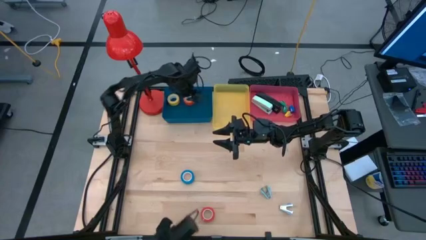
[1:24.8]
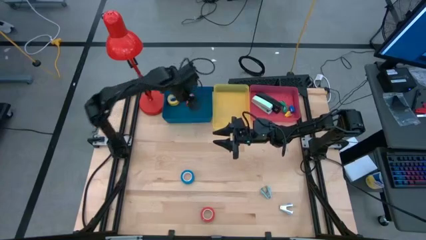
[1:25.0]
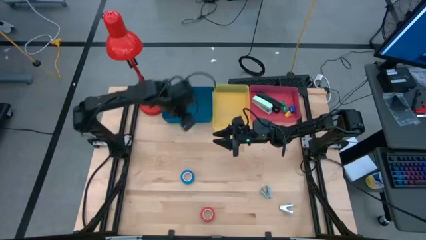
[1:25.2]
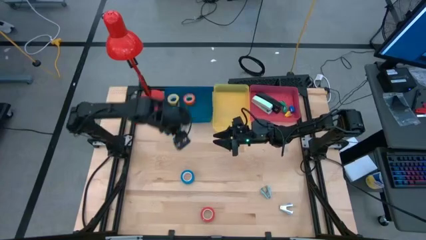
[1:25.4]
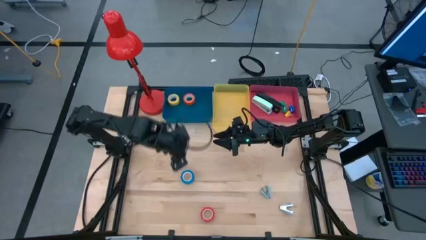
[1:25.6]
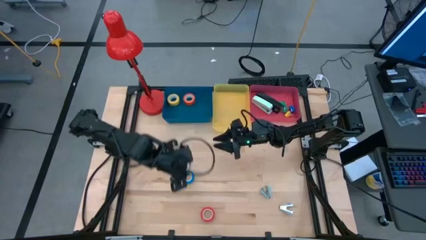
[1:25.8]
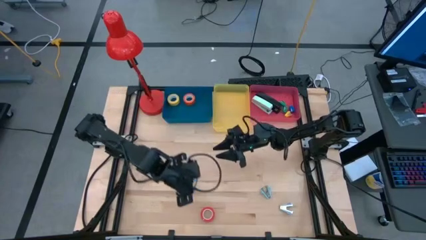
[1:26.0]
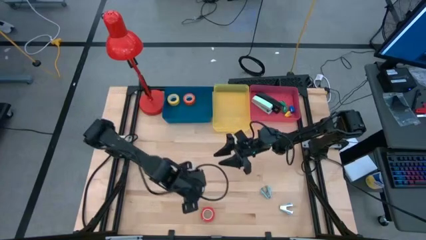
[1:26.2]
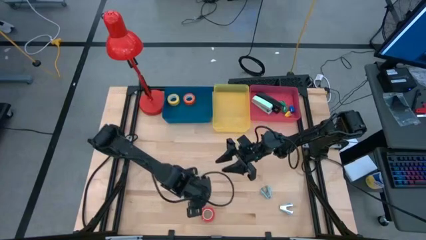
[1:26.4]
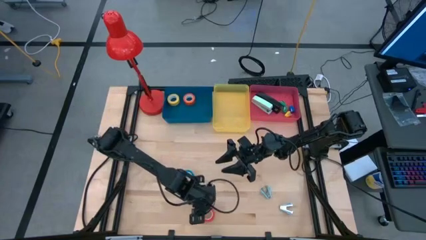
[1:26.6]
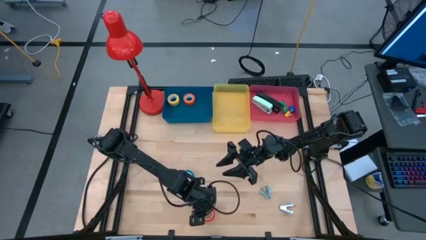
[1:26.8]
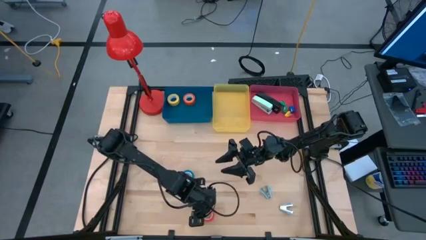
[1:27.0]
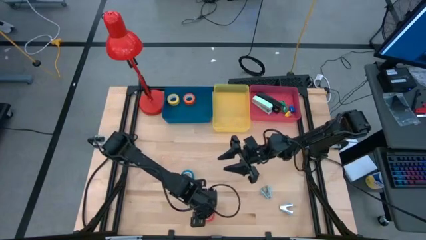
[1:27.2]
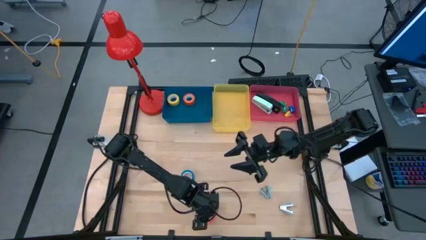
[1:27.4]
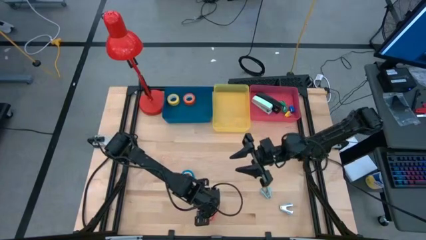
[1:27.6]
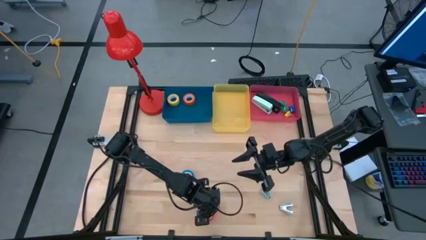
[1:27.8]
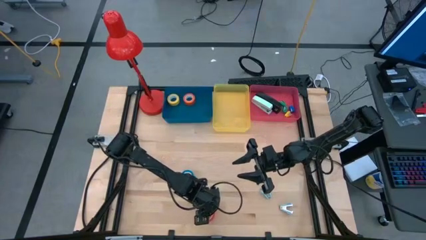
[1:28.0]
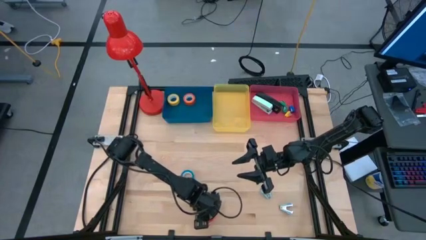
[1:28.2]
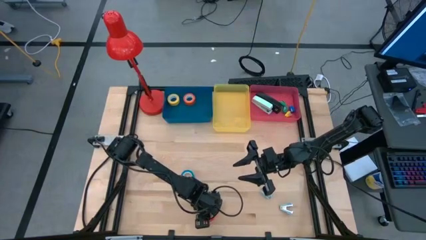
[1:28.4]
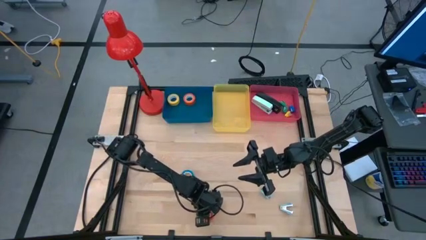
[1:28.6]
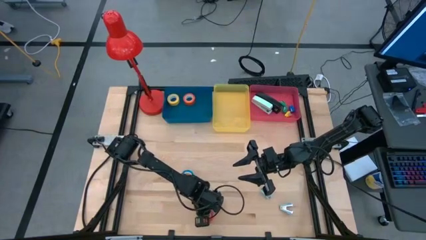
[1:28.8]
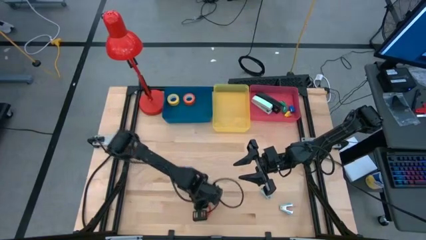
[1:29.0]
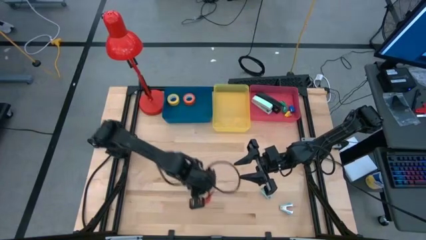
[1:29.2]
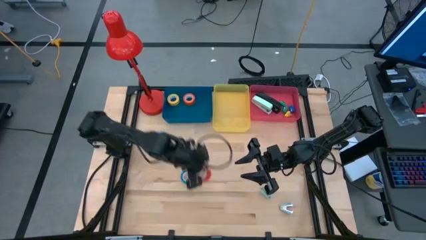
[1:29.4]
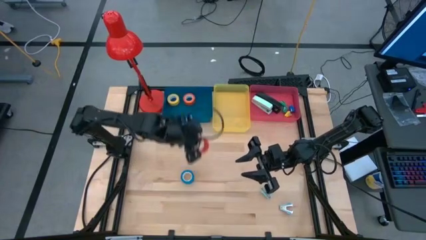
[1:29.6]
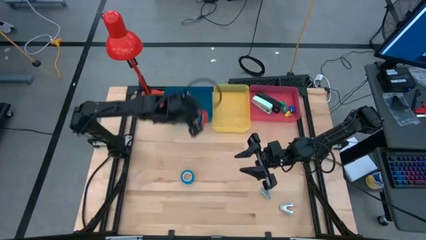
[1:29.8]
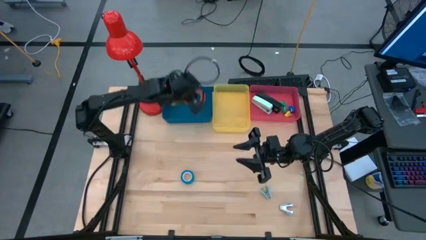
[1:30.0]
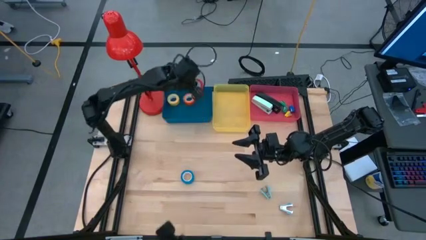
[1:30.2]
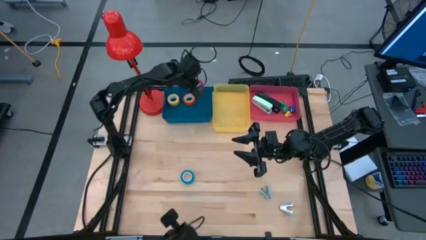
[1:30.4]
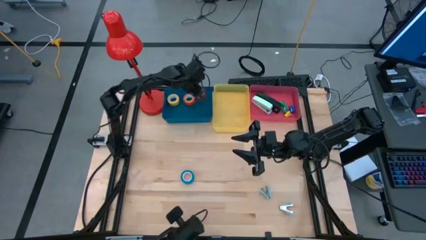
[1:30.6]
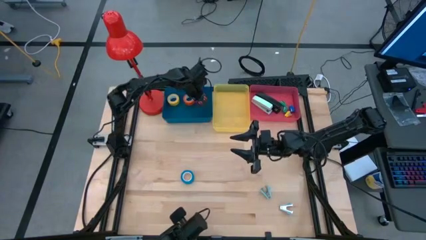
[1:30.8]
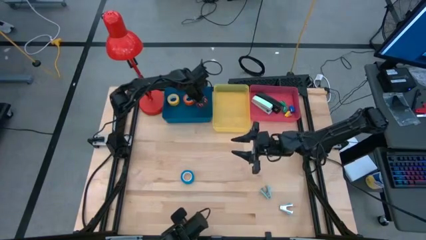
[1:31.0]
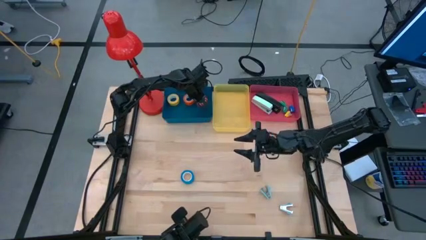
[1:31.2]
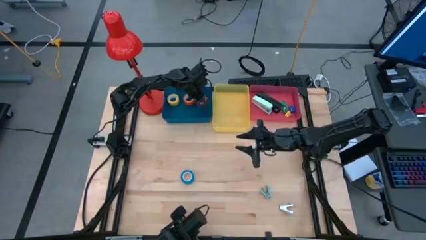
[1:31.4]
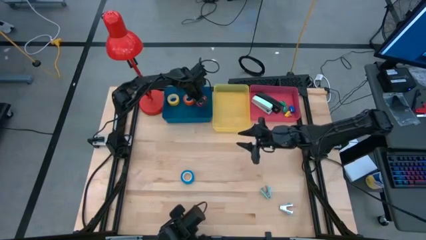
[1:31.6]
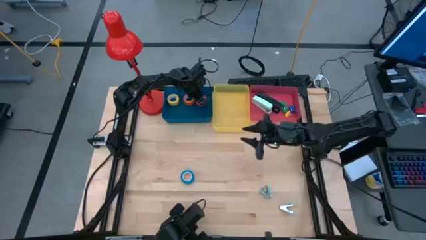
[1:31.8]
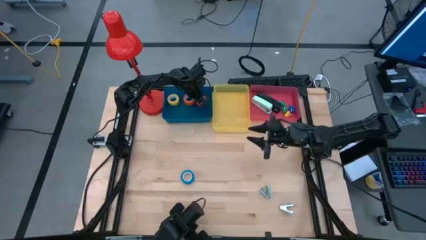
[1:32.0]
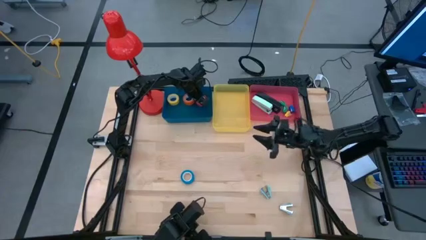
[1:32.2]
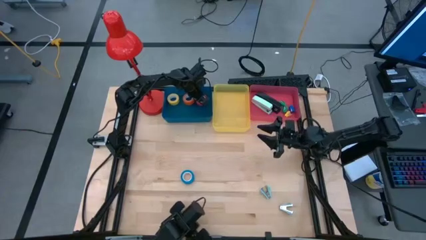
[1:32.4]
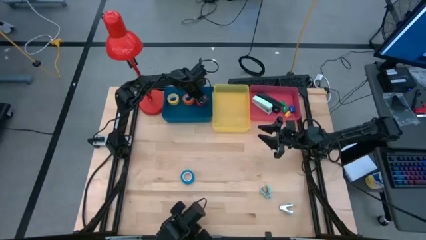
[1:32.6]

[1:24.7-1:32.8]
Task: Pick and place Stapler, Stapler remover, tape
Put the red tape into the blue bin

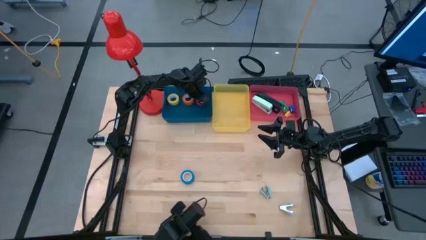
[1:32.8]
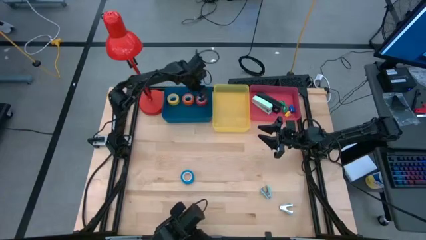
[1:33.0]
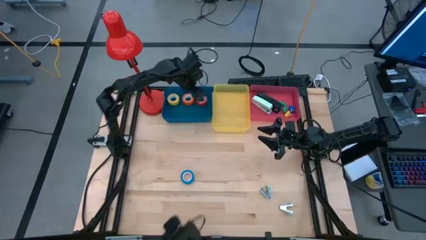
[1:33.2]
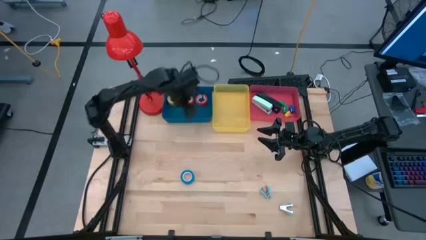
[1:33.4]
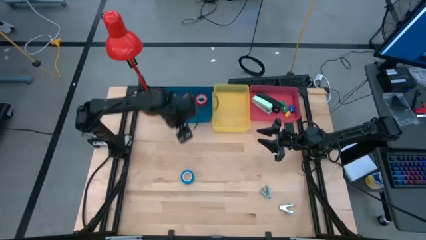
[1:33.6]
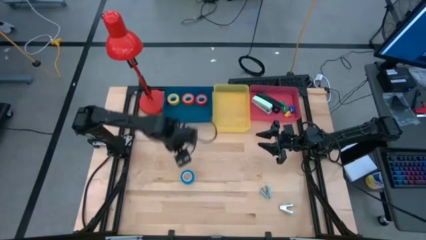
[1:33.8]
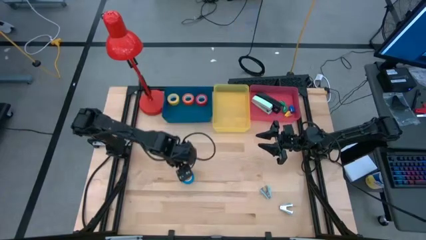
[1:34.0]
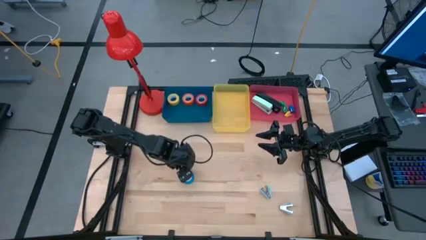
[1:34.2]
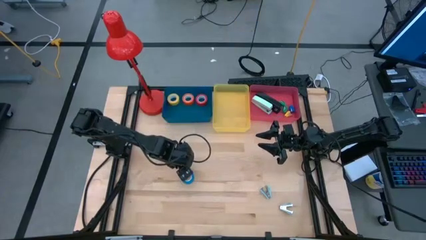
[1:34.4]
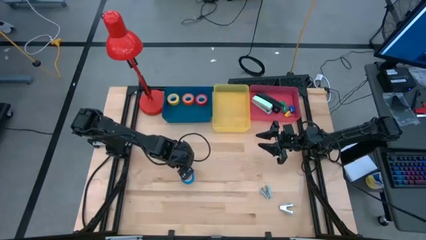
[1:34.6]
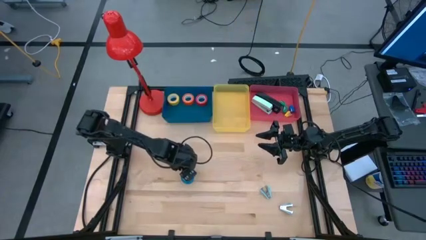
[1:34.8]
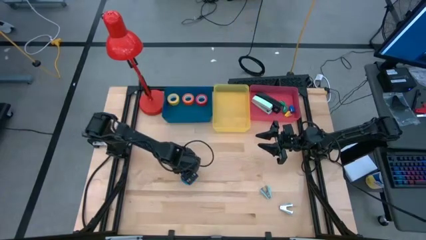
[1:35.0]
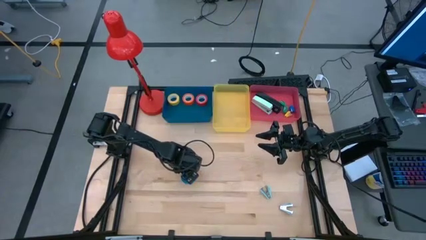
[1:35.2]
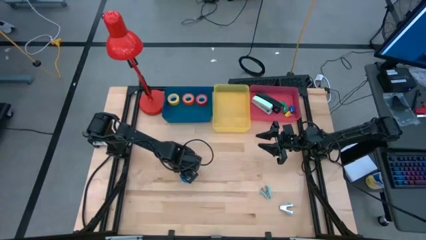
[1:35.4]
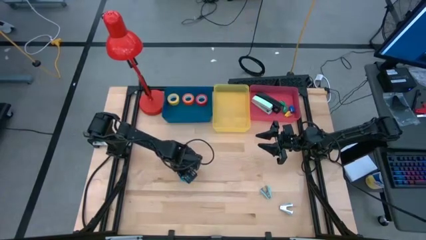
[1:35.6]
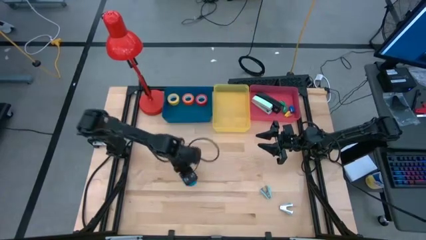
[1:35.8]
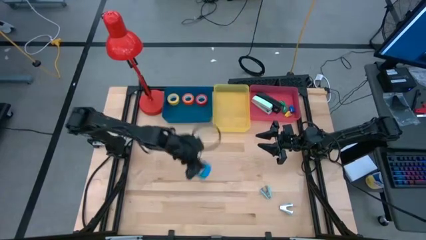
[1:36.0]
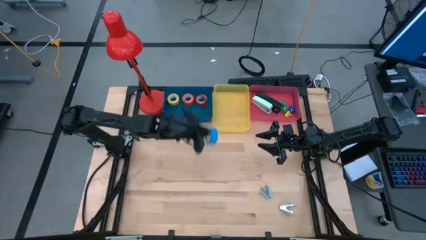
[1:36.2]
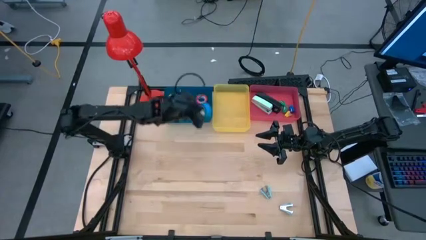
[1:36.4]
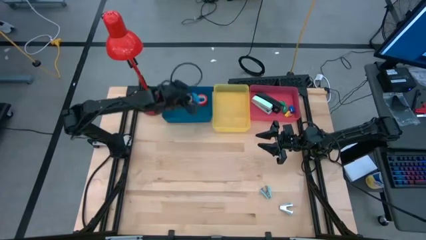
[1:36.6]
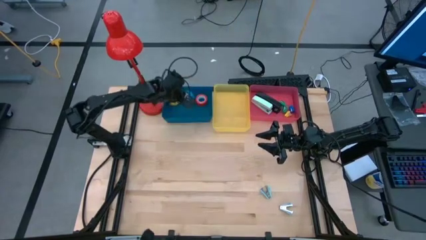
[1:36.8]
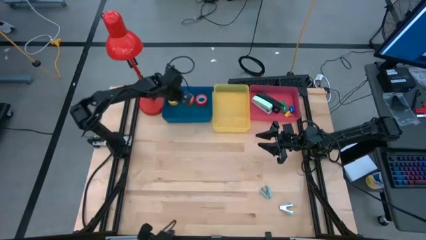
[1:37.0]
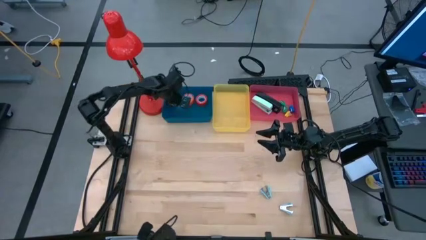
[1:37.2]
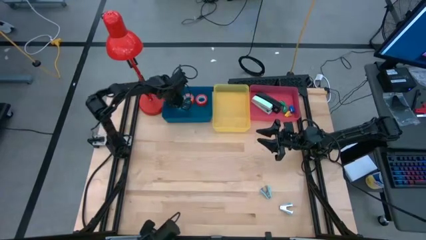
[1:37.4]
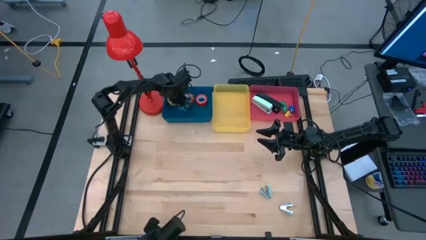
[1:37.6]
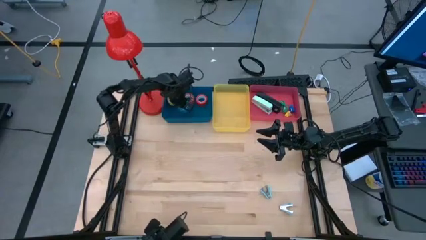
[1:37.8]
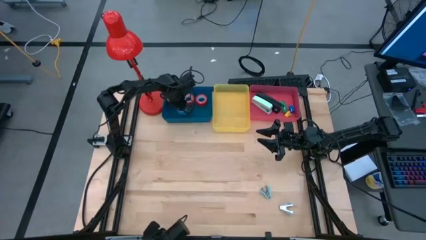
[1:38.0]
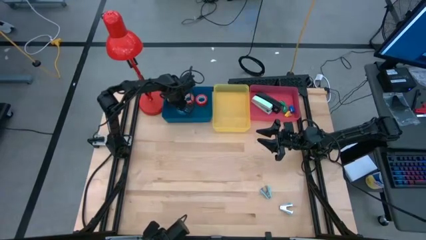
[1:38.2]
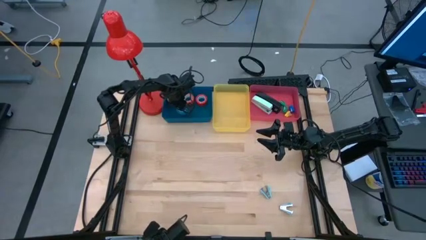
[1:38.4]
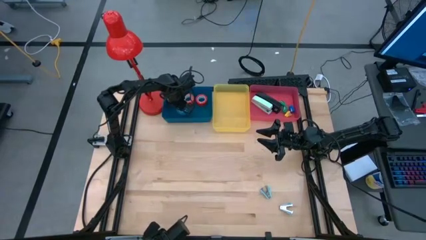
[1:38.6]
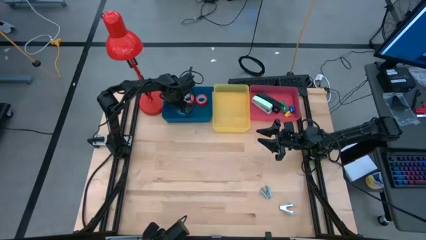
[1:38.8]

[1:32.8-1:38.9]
Put the blue tape into the blue bin
